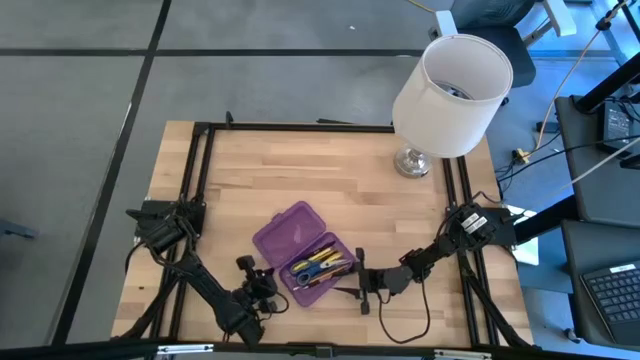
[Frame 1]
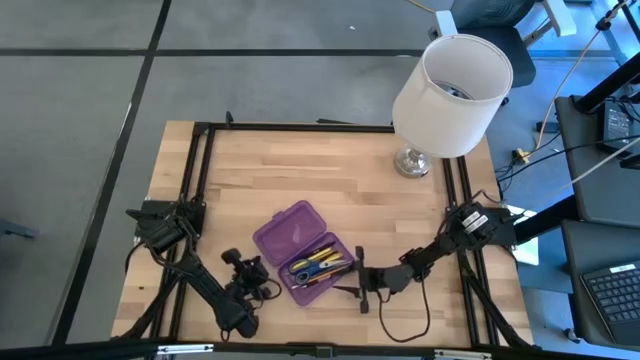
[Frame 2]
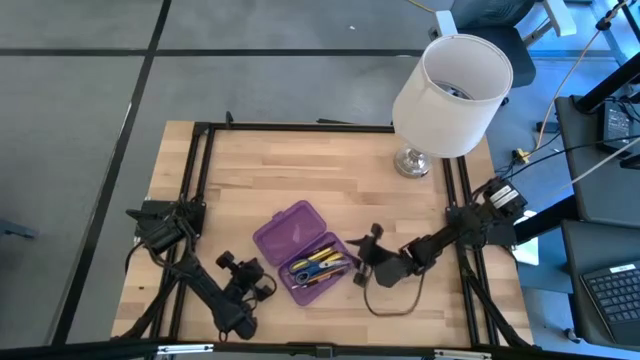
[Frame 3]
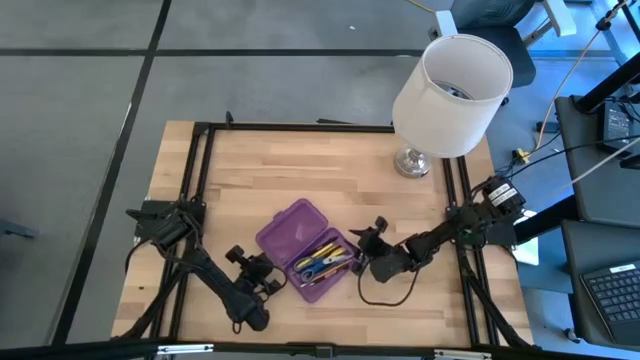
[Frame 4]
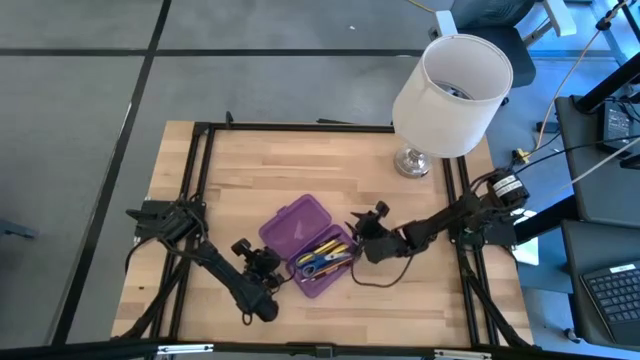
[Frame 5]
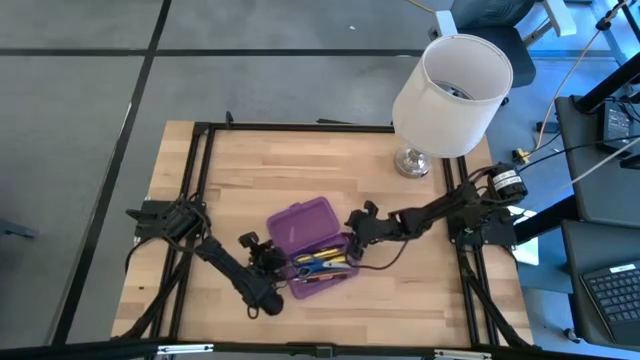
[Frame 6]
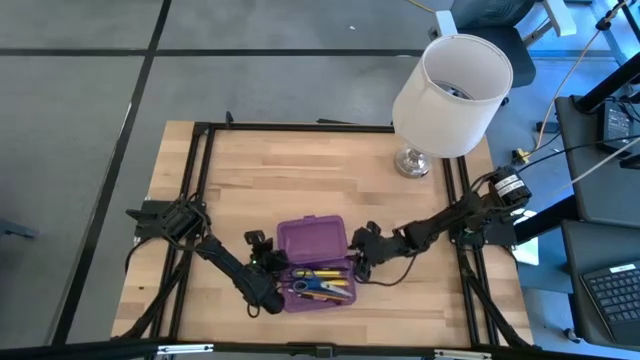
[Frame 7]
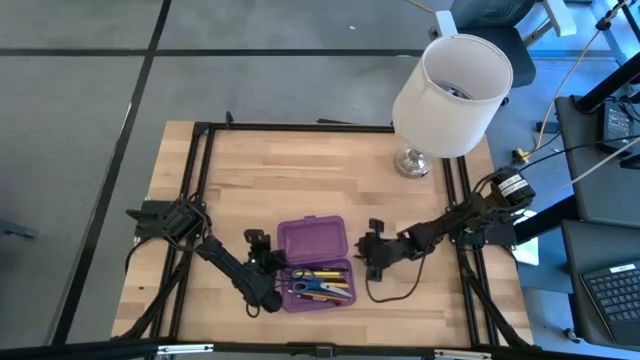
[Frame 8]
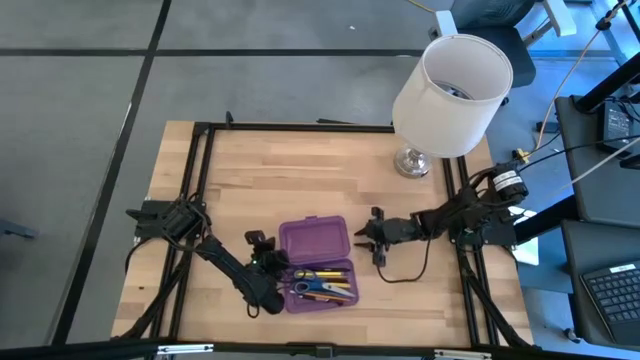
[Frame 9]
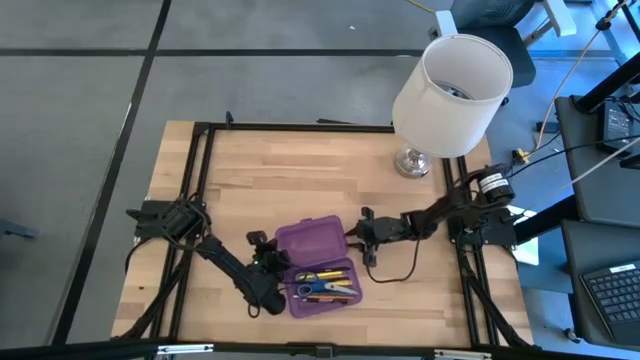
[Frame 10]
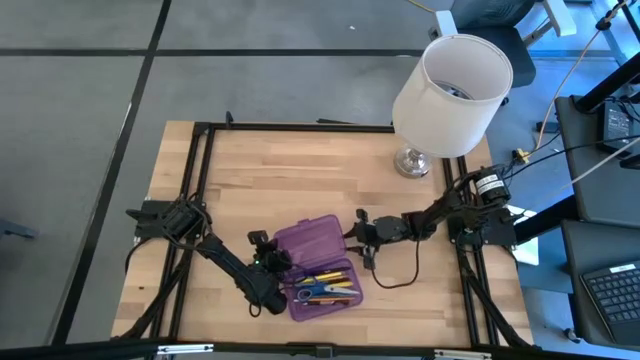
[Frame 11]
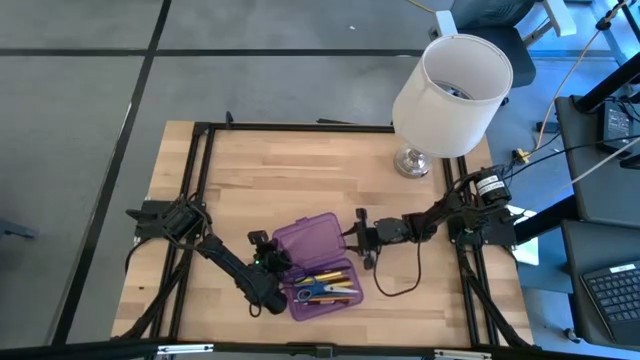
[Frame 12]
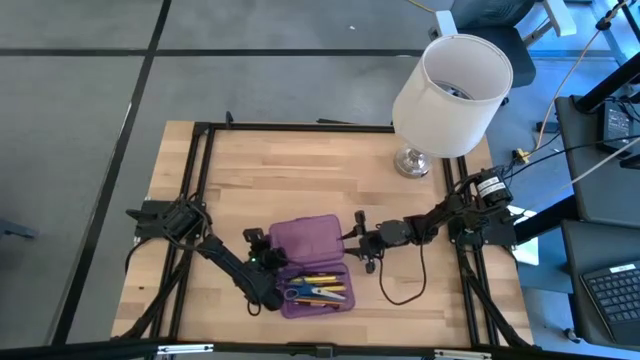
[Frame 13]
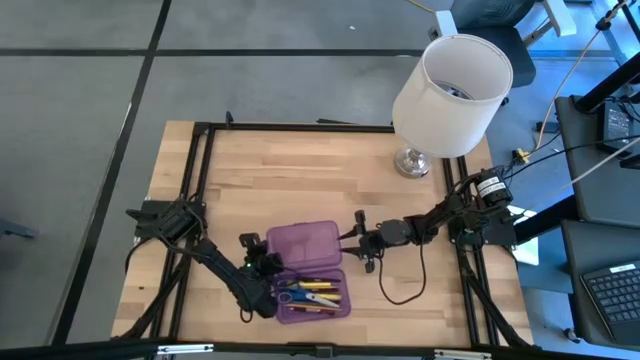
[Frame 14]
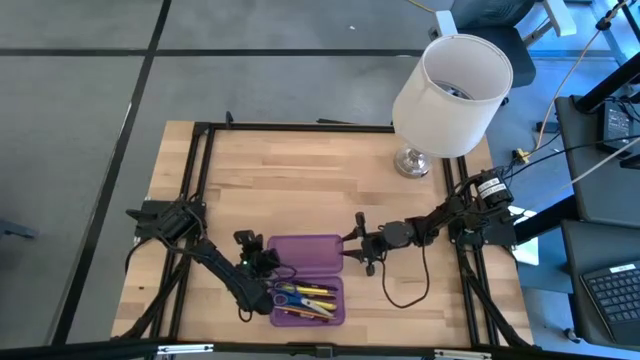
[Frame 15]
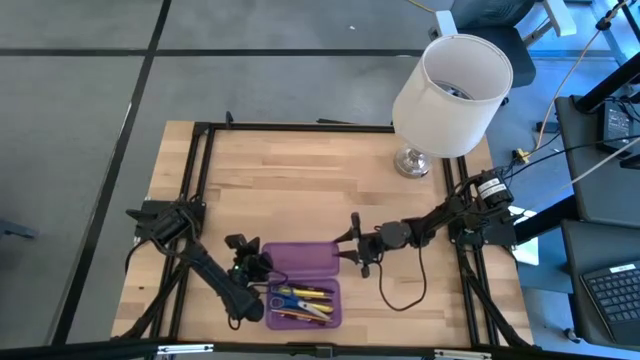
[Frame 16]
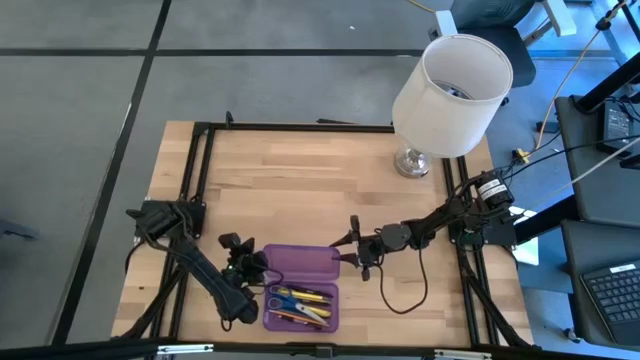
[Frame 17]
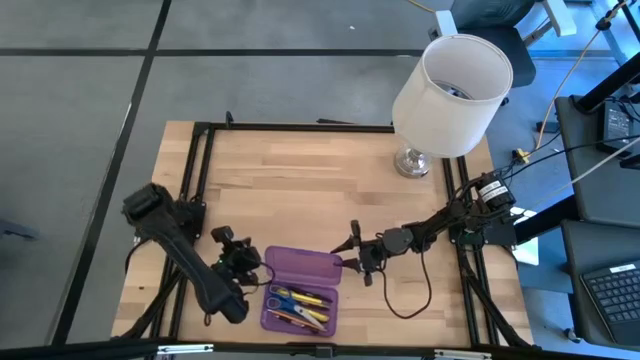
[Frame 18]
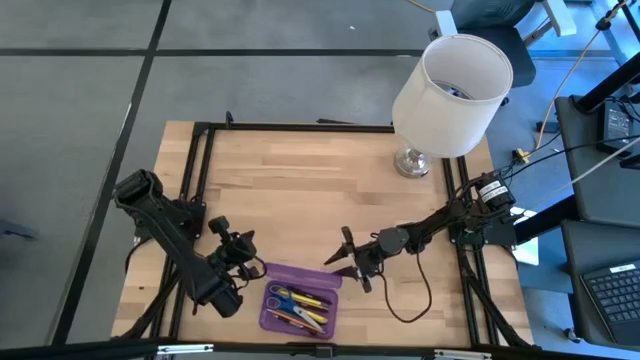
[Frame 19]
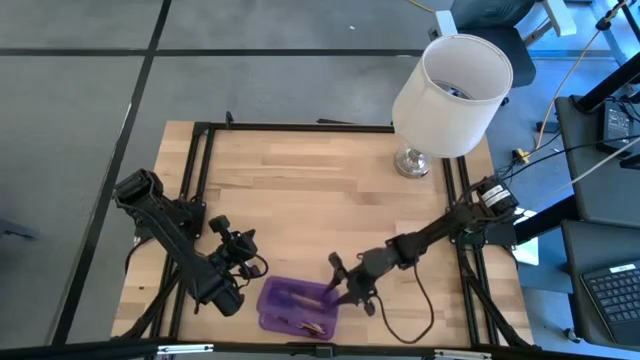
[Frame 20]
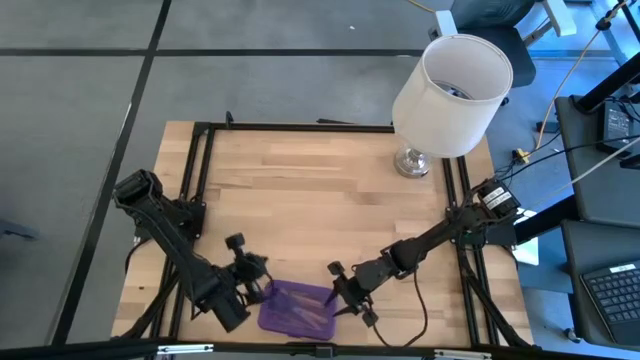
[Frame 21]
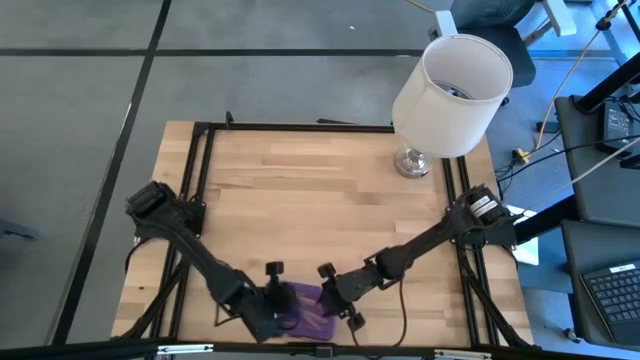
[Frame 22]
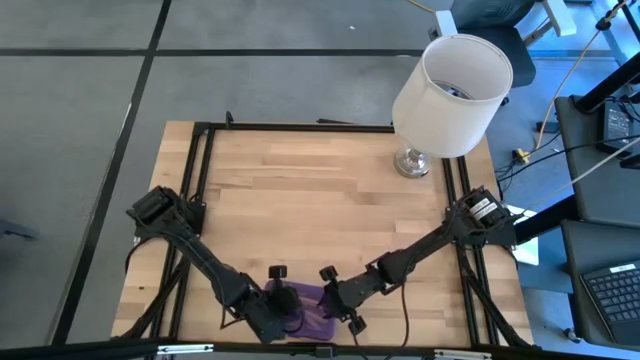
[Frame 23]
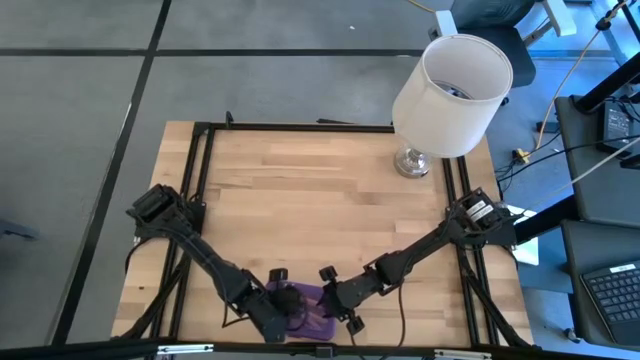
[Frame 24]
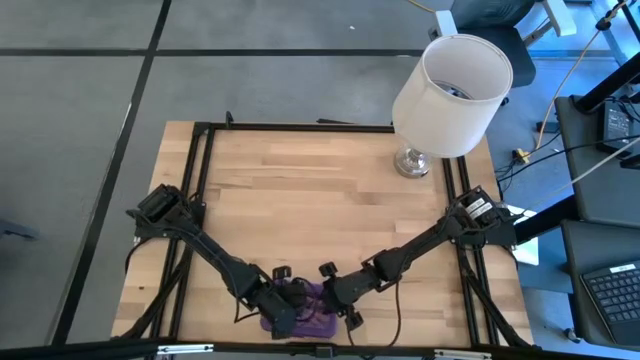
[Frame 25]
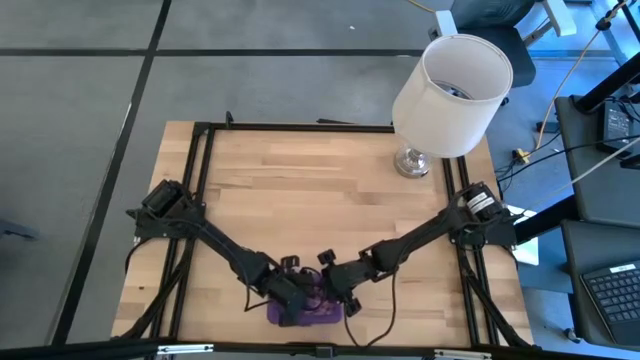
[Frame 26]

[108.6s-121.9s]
Task: Pick & place school supplies into a supply box
Close the violet box

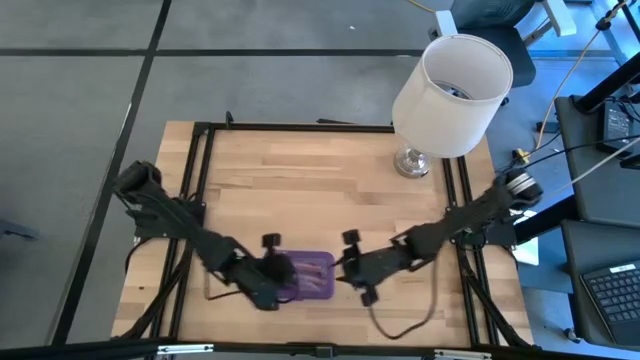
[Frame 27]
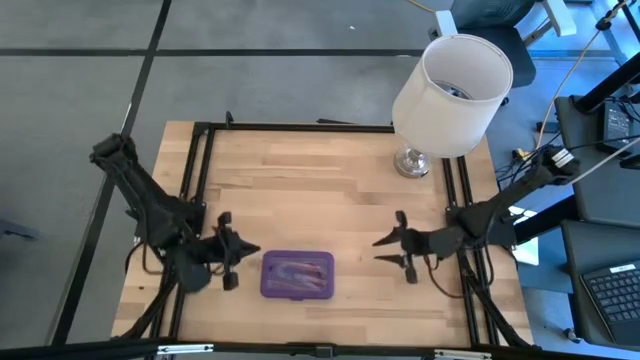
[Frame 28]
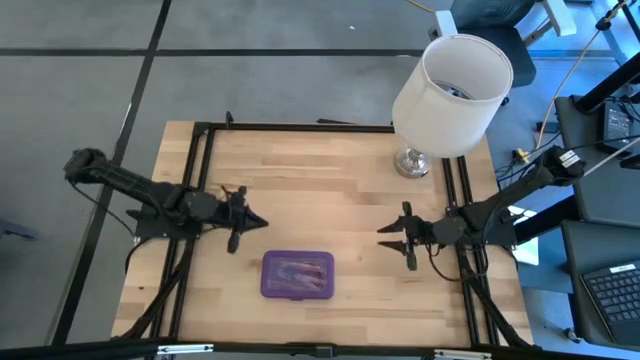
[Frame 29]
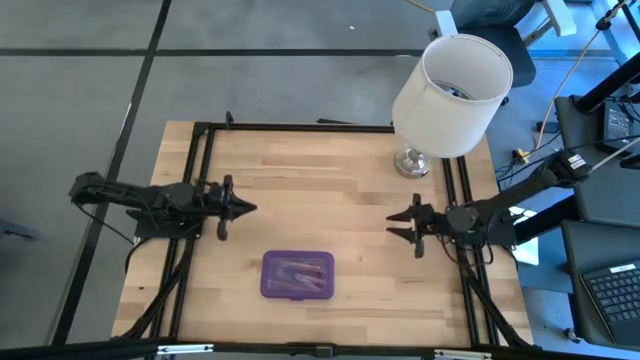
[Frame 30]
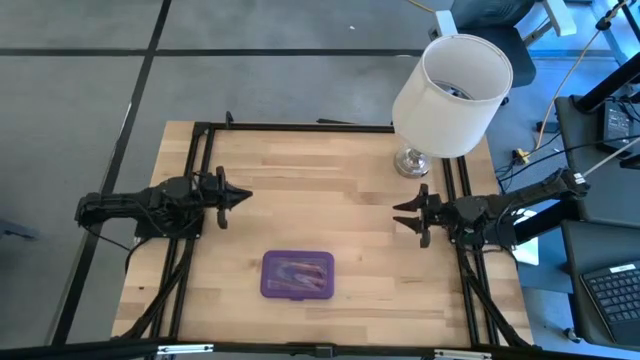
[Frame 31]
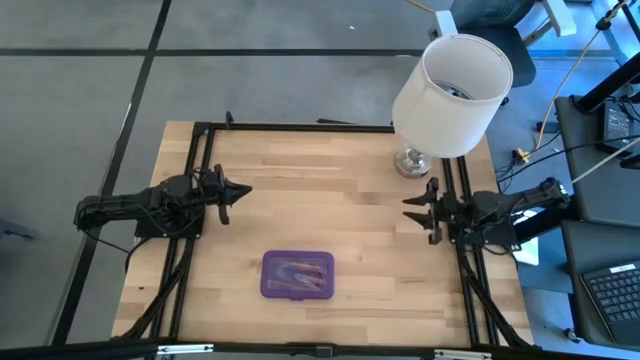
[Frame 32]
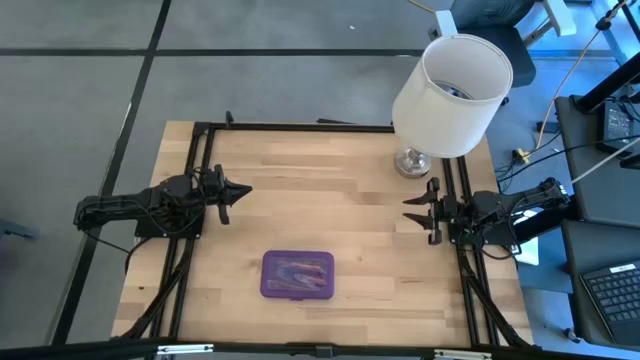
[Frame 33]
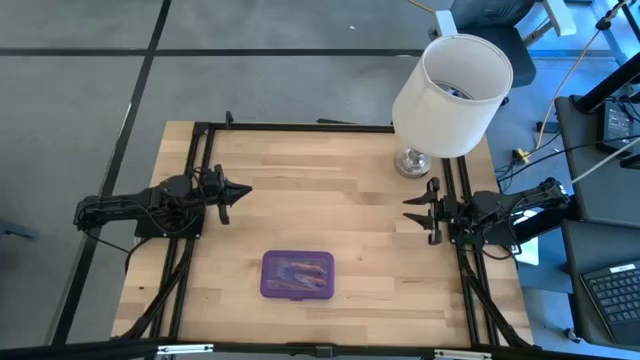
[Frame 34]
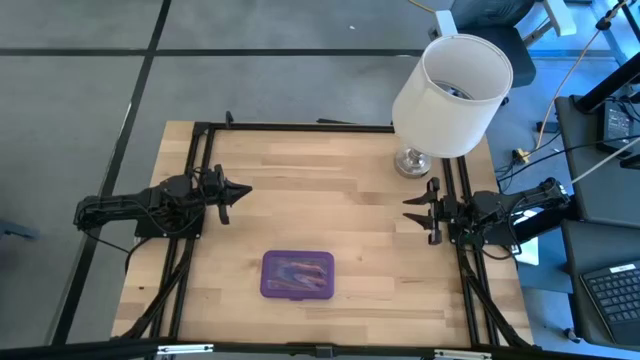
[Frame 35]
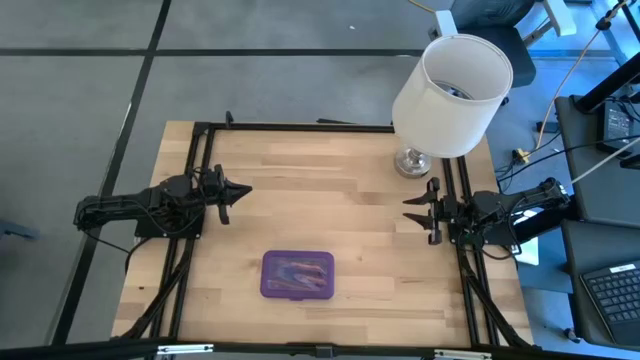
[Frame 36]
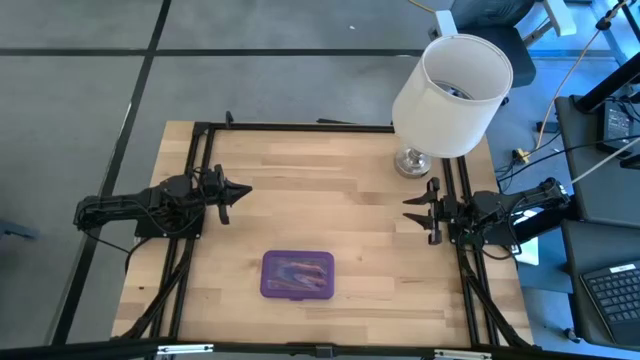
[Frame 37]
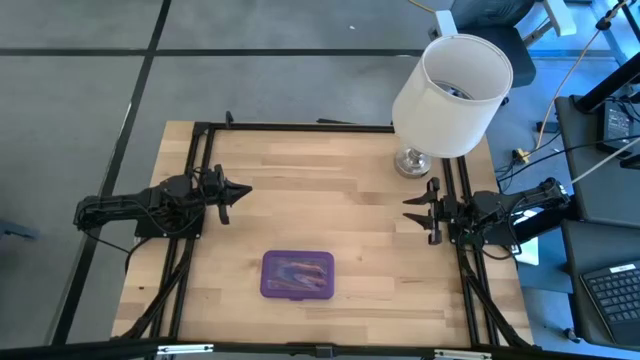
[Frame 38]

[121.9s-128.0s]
Return to Home Position

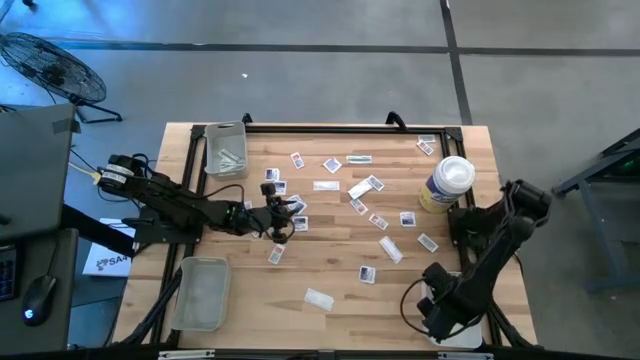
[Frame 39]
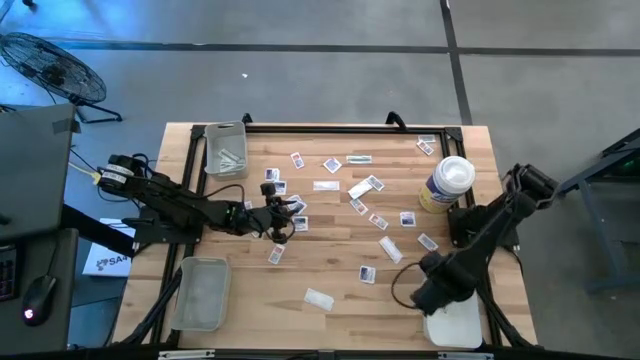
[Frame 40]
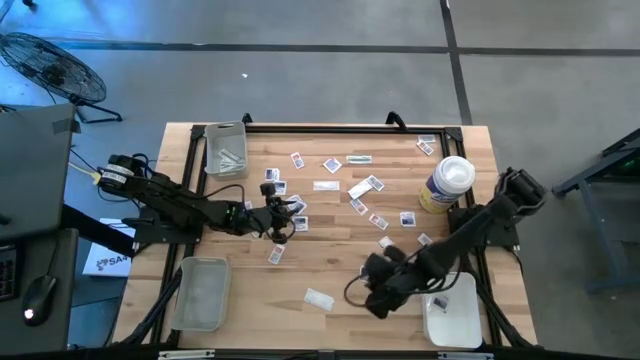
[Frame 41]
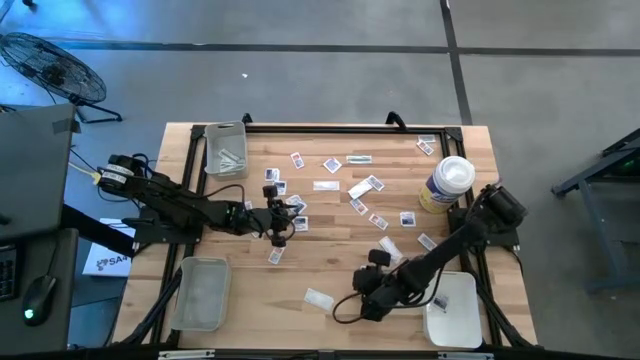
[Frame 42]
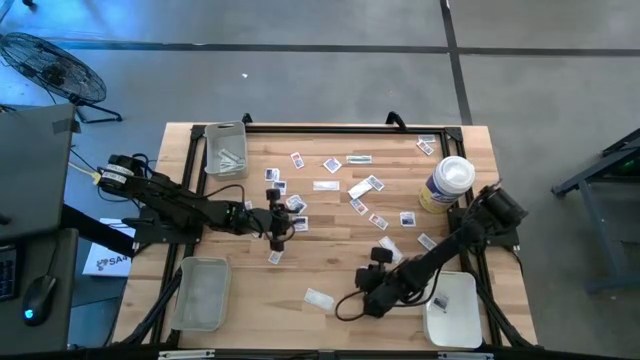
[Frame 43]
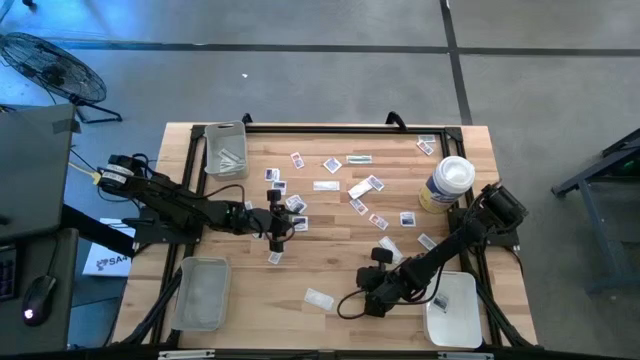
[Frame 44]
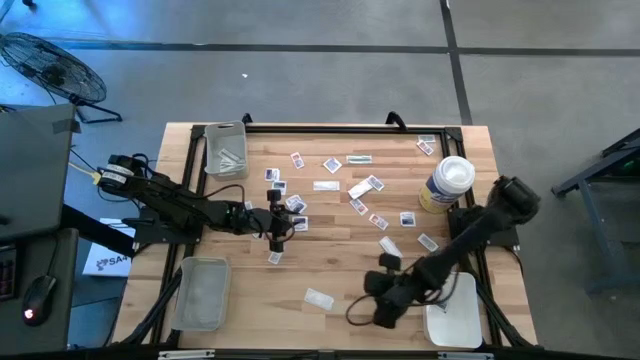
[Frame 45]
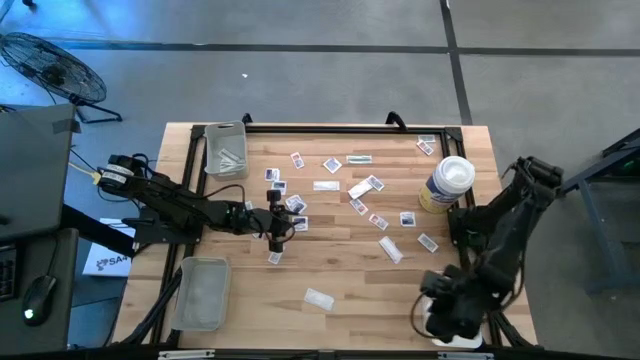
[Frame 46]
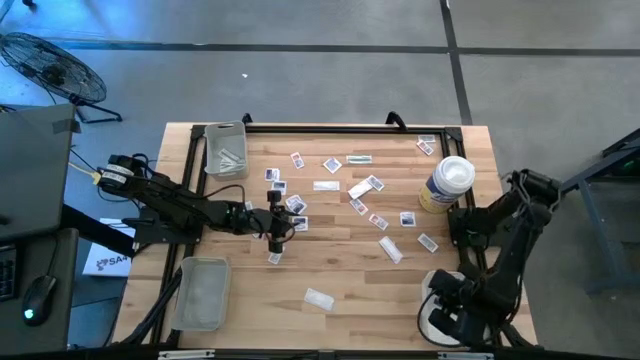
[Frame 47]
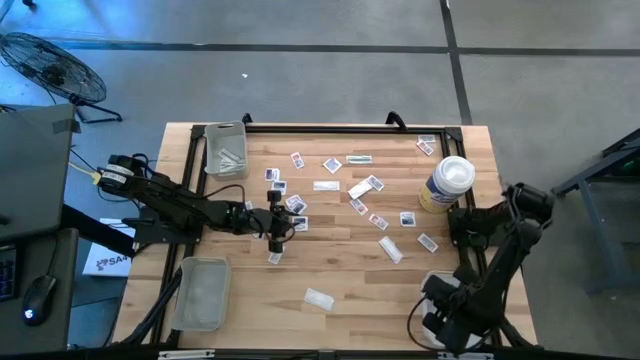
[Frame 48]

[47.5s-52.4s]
Task: Pick & Place First Aid Supplies
Put the blue alcohol pad into the white bin
